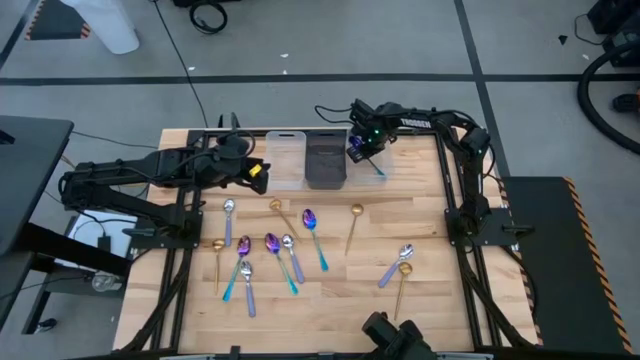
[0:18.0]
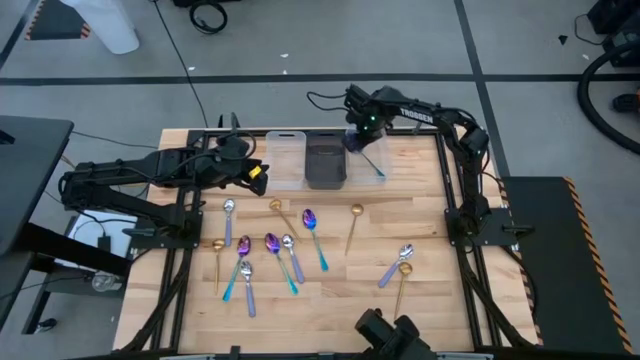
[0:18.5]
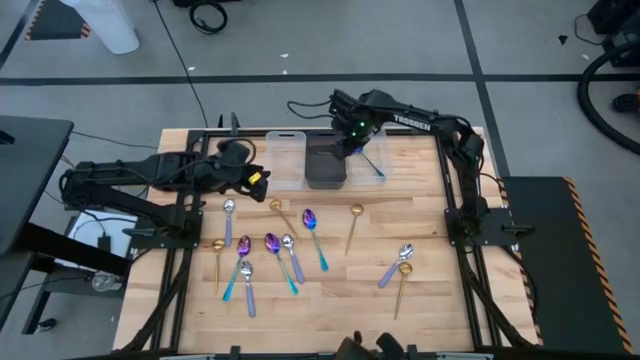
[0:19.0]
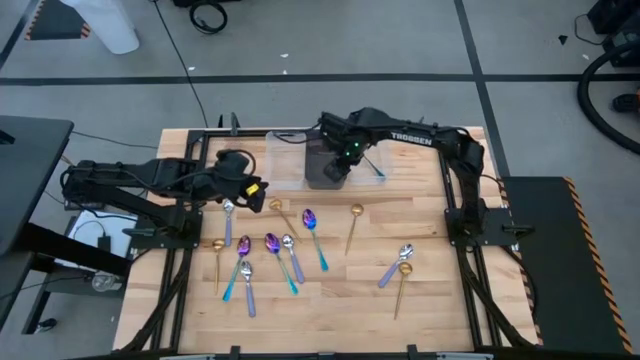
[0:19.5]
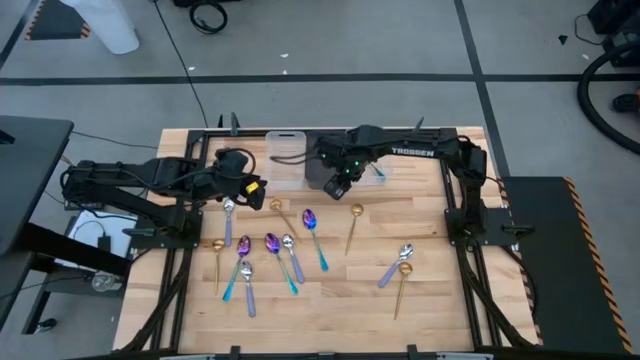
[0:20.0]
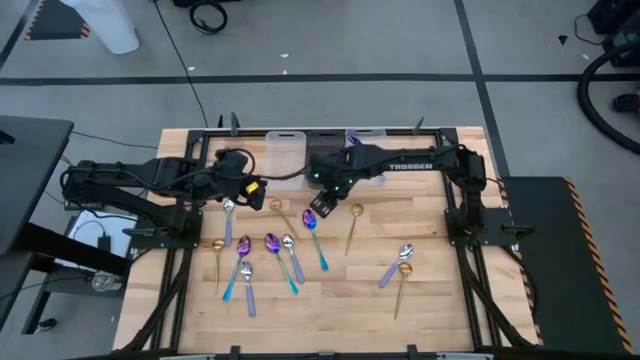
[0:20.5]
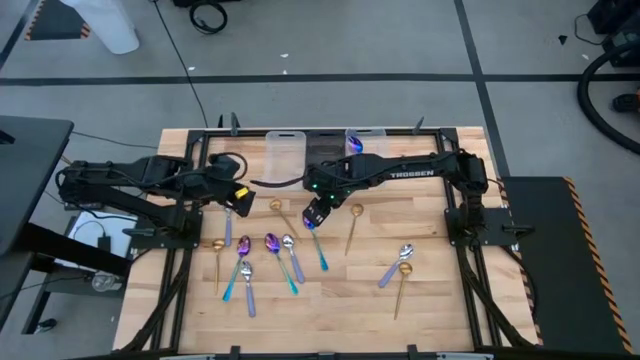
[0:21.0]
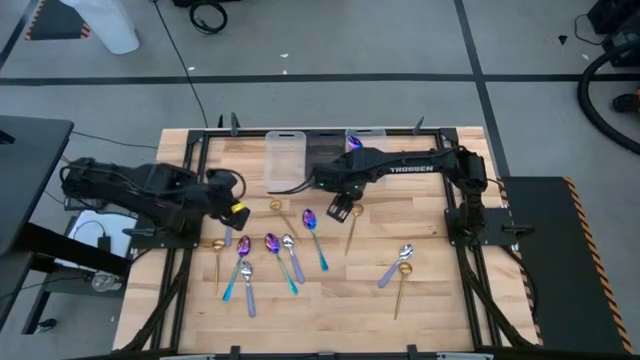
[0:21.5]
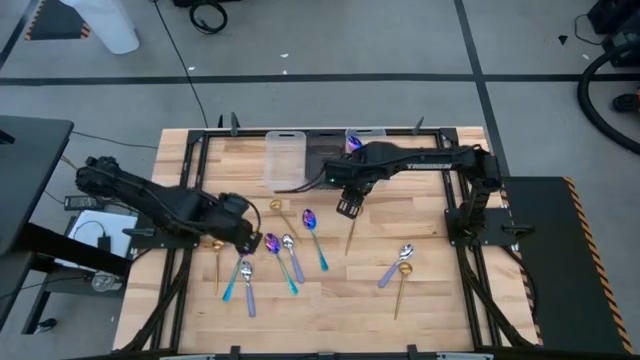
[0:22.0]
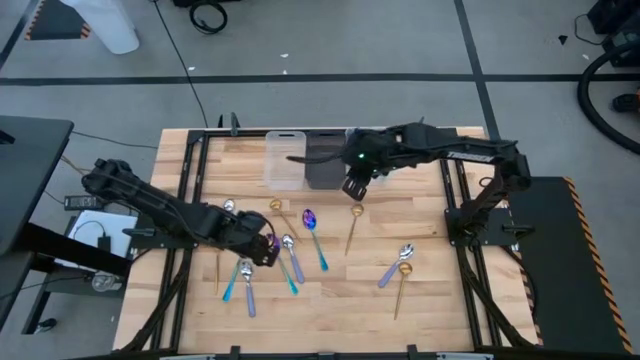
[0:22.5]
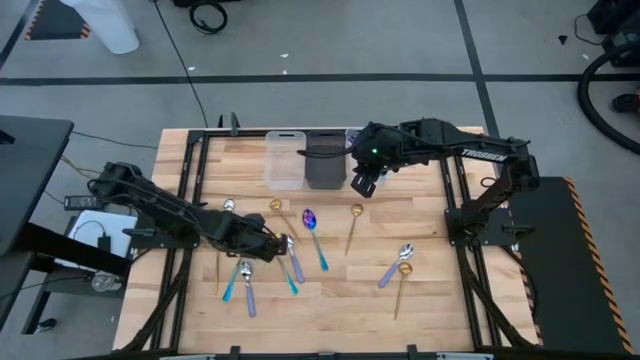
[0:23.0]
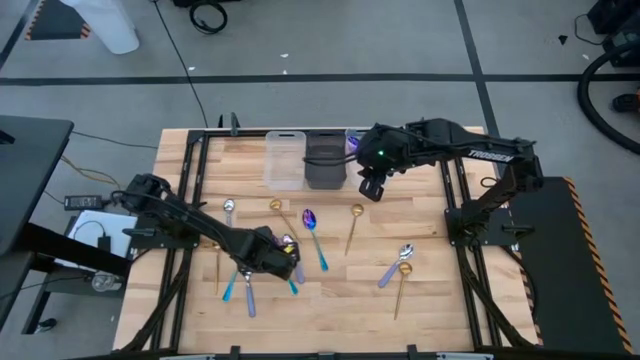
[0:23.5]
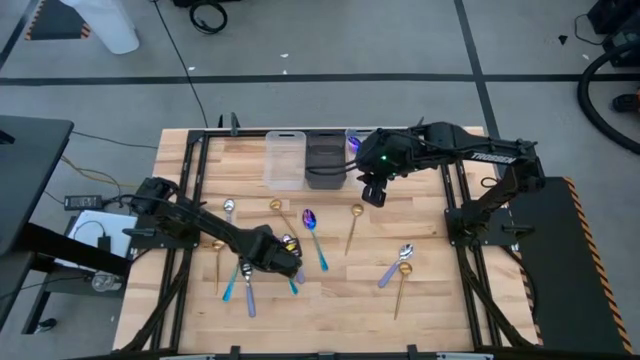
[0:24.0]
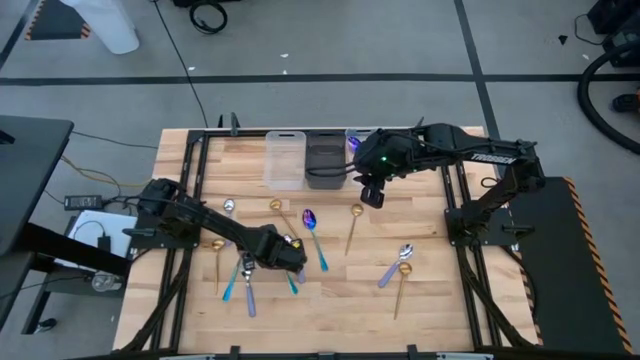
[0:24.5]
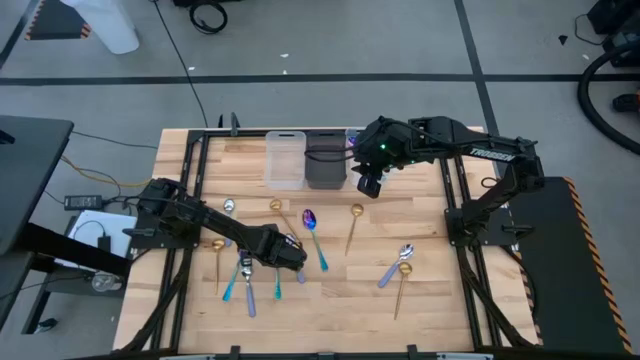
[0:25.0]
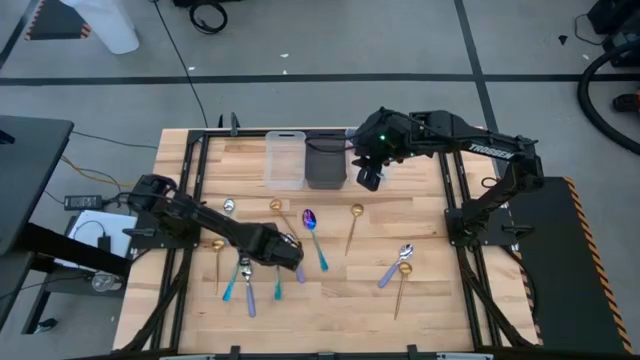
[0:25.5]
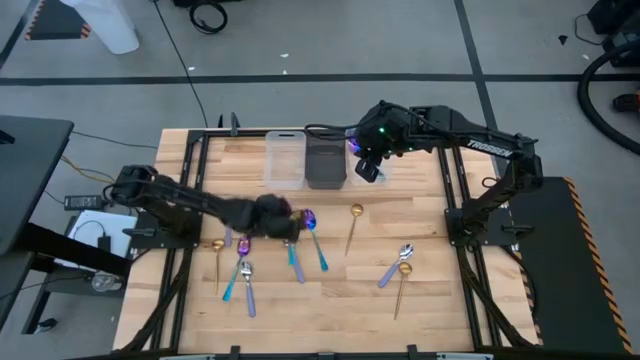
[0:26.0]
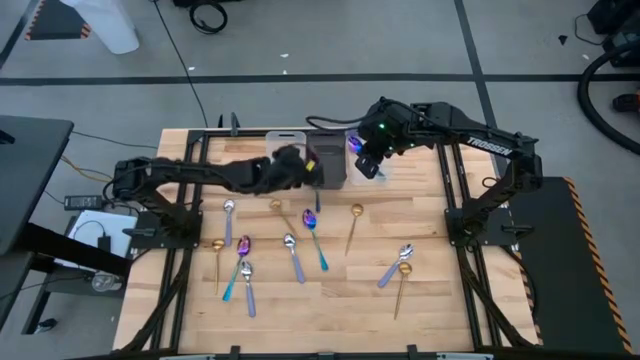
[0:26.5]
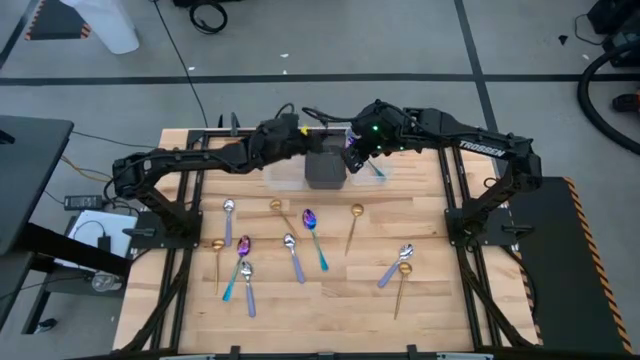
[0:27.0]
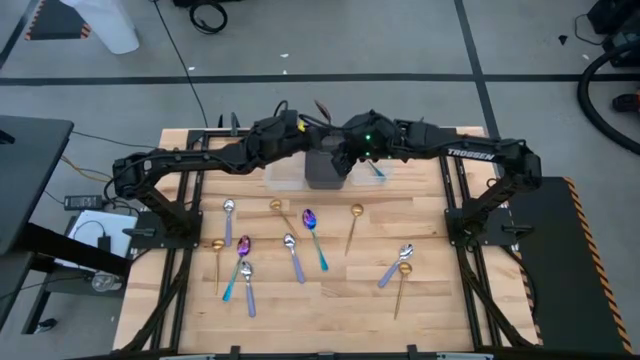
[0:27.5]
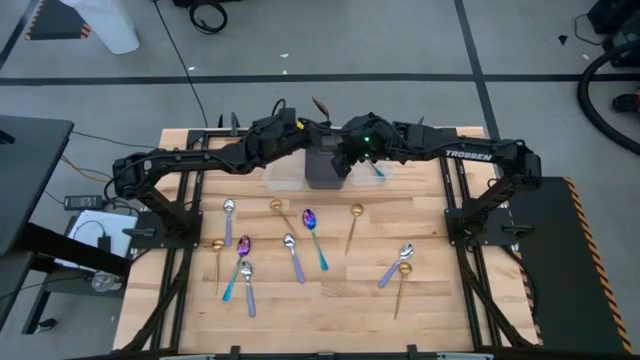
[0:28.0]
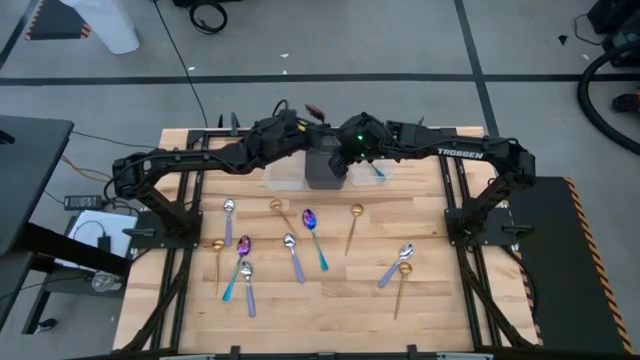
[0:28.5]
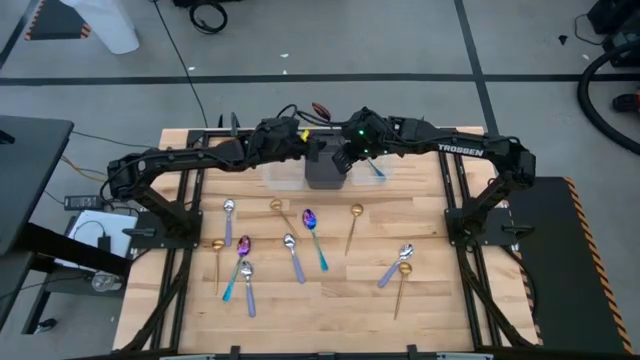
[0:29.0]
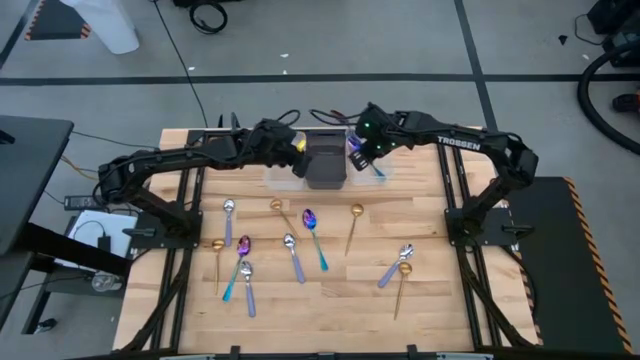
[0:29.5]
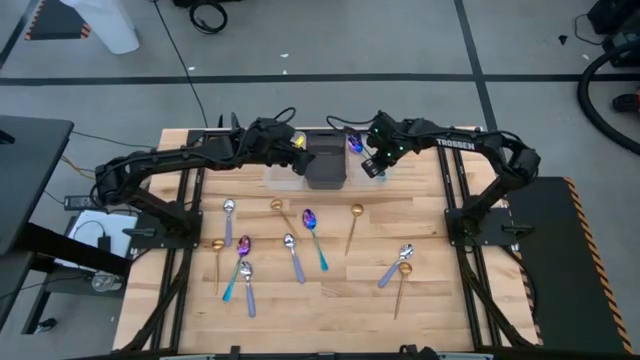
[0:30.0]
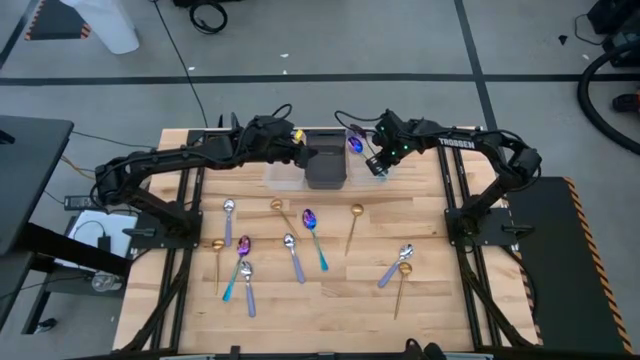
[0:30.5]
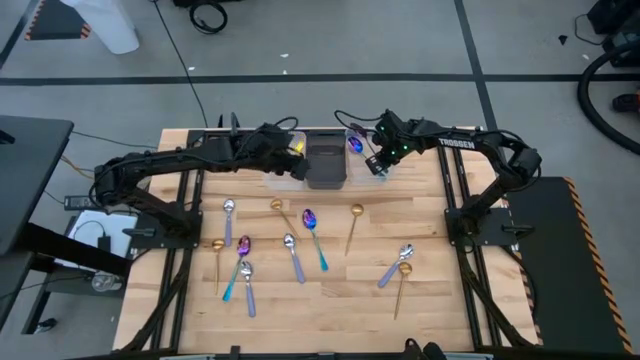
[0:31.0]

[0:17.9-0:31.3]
Task: Sort silverware by color (type)
Put the middle blue spoon into the right transparent bin

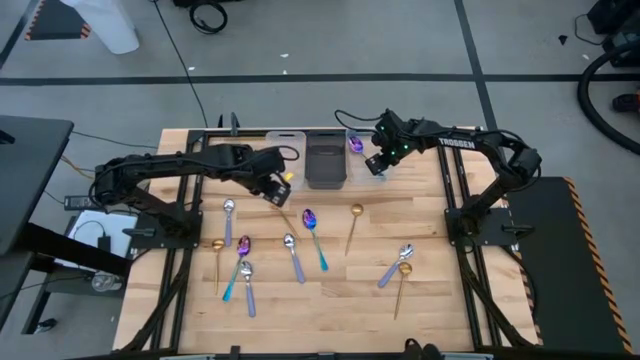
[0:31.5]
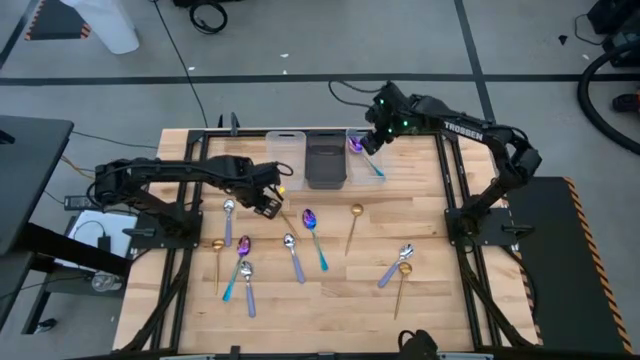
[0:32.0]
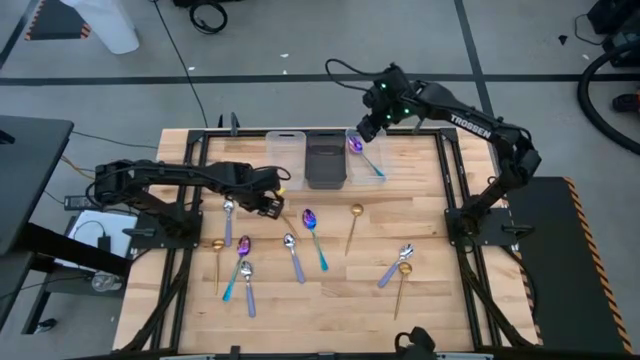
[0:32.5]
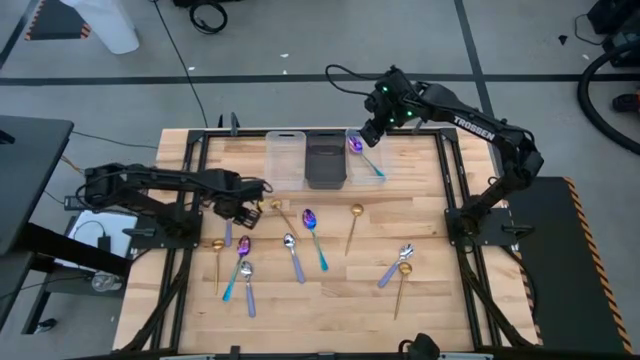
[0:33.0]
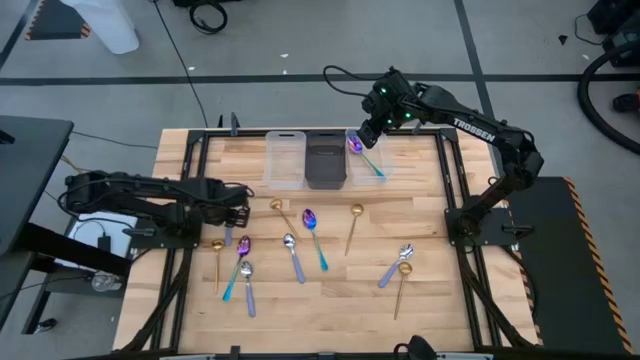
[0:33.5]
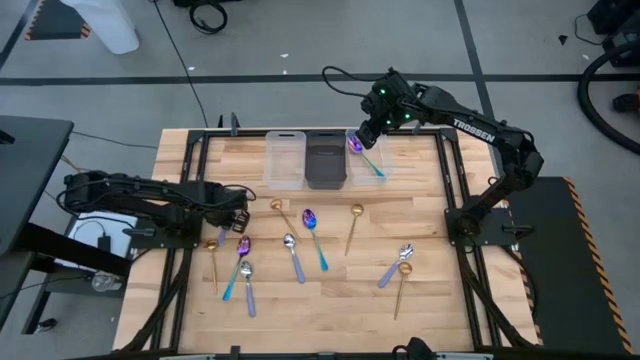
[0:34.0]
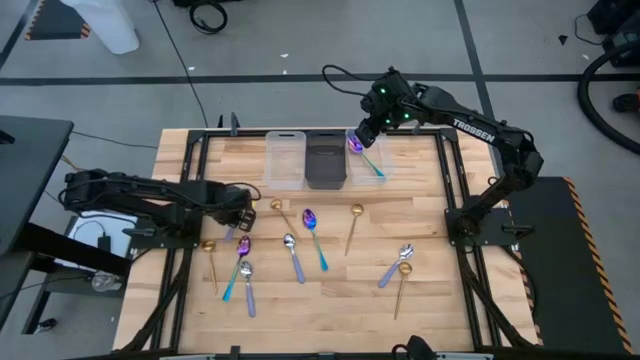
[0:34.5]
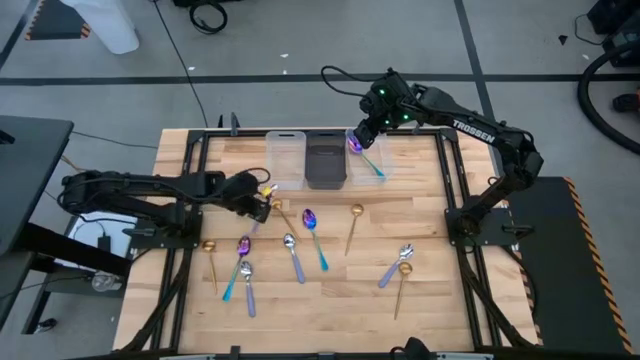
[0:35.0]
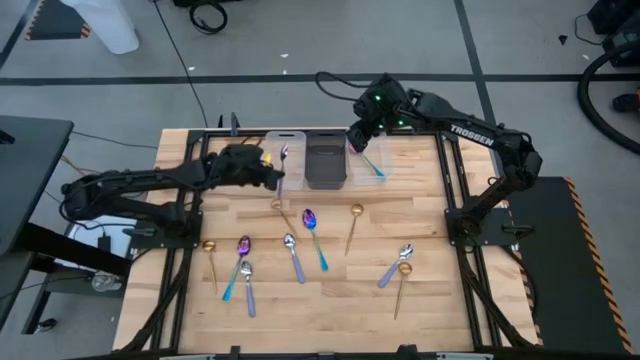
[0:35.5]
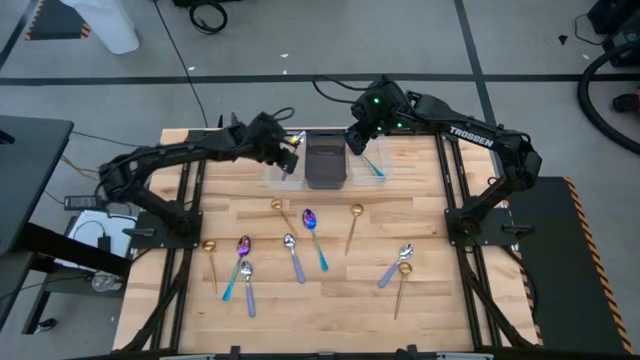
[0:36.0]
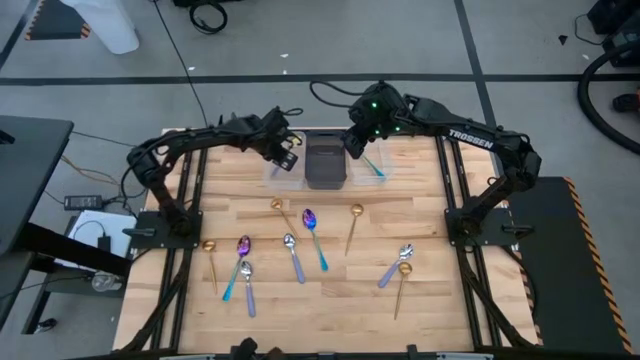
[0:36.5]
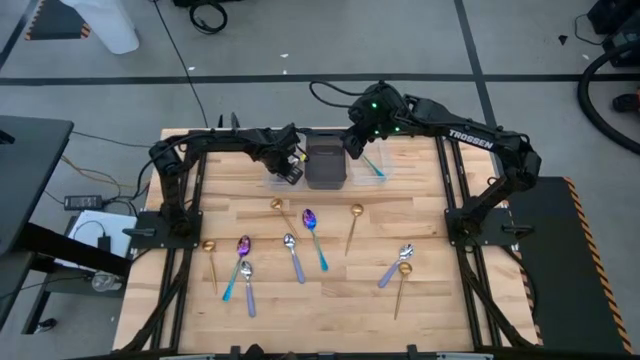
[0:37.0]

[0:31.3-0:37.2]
Put the top left purple spoon into the left transparent bin

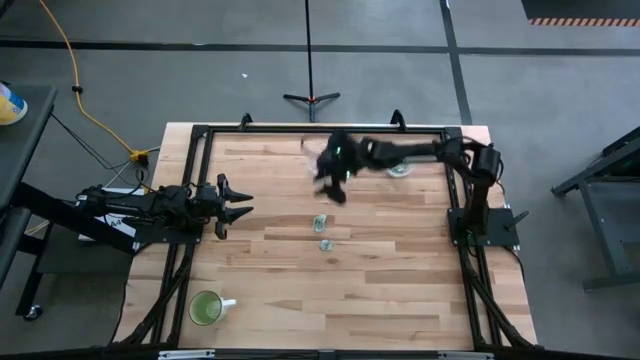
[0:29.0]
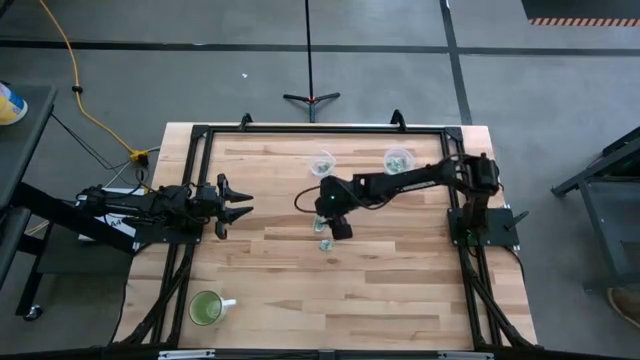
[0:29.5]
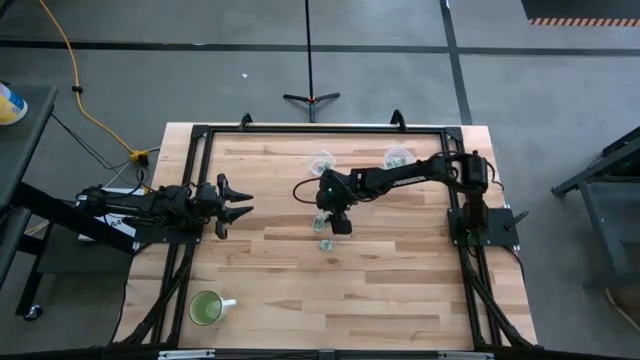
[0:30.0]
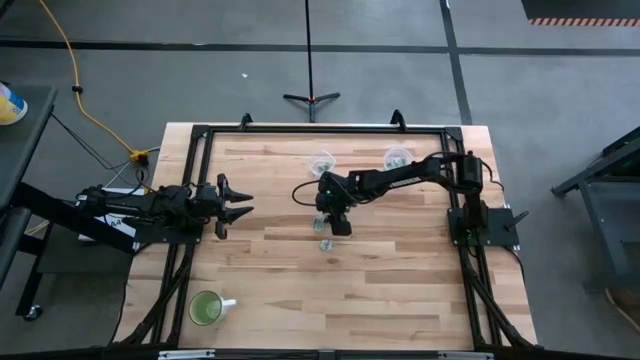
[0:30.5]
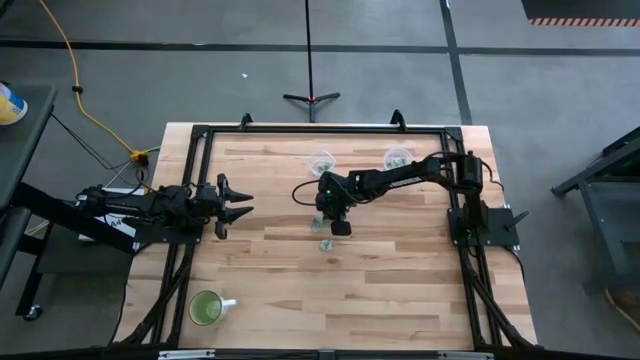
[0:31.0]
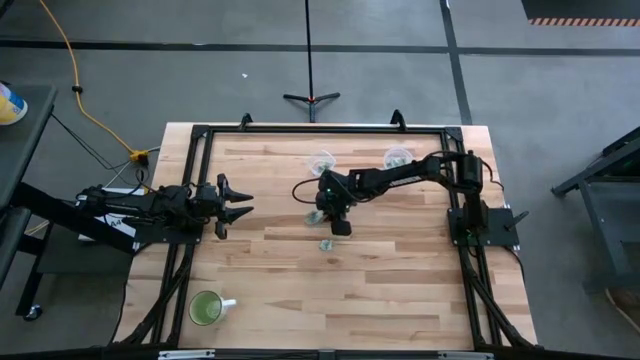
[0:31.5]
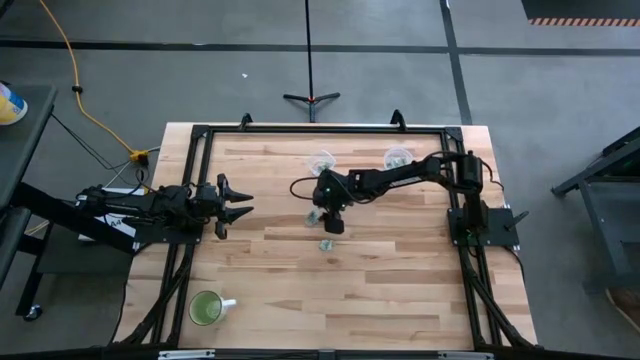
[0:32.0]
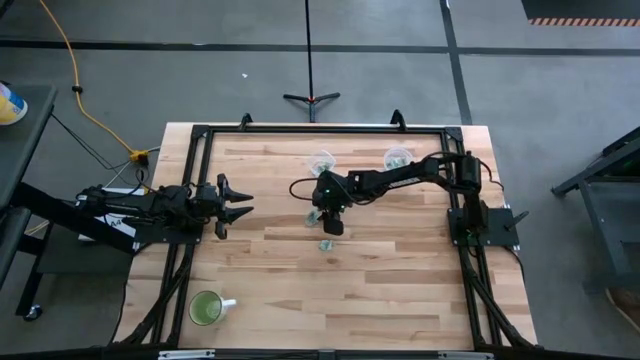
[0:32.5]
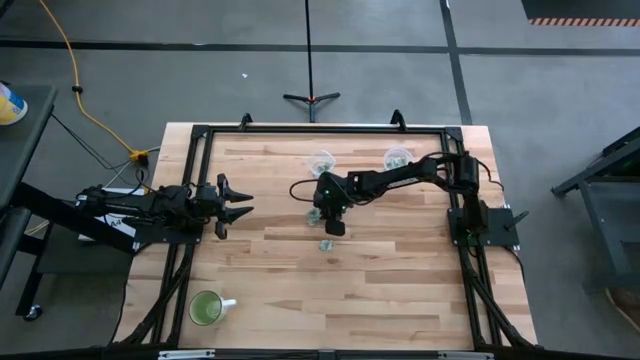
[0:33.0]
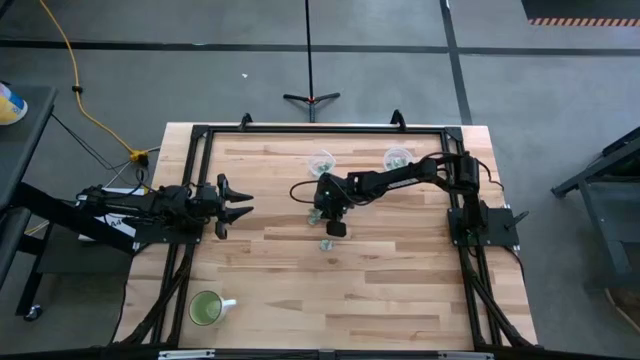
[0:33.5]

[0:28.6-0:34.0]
Task: Pick and place Stevia / Truvia into bins
Put the stevia packet into the left transparent container
